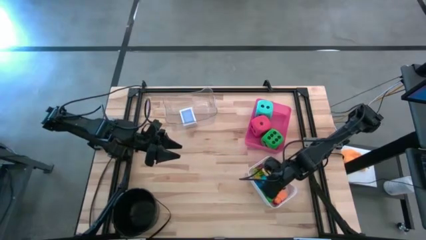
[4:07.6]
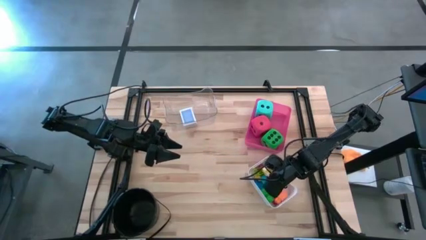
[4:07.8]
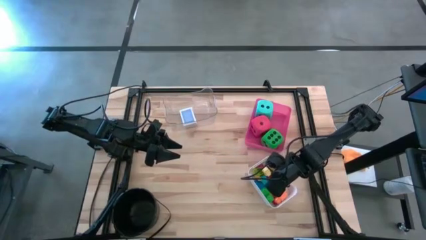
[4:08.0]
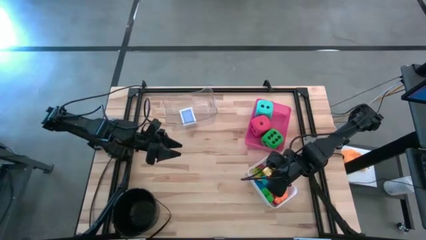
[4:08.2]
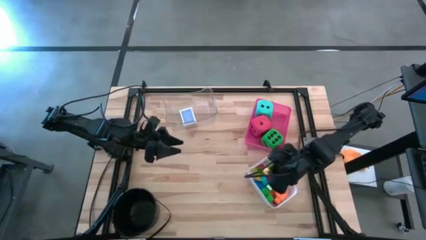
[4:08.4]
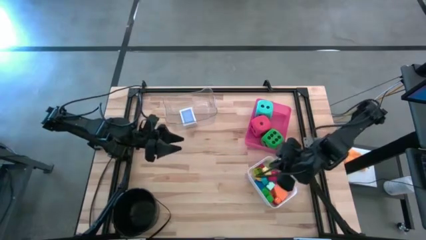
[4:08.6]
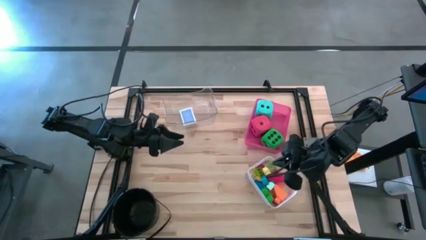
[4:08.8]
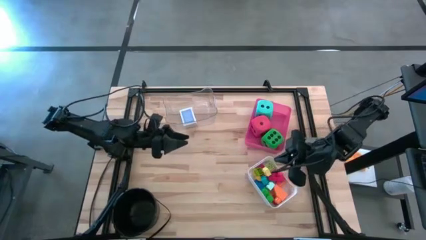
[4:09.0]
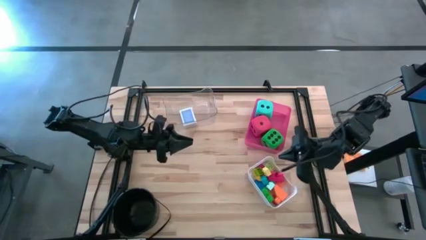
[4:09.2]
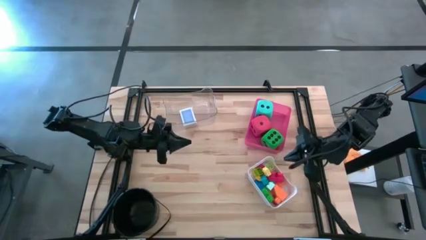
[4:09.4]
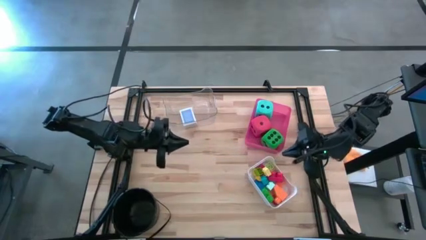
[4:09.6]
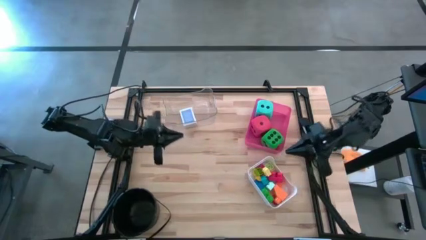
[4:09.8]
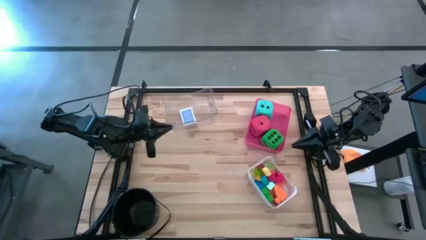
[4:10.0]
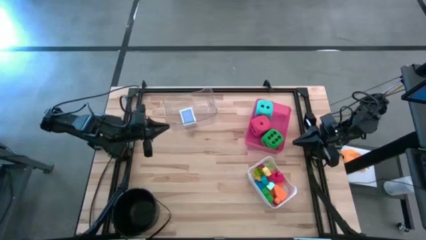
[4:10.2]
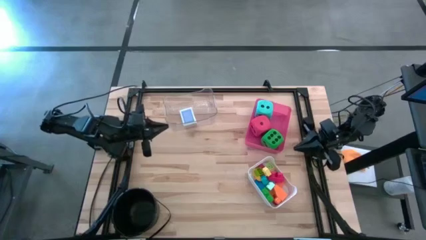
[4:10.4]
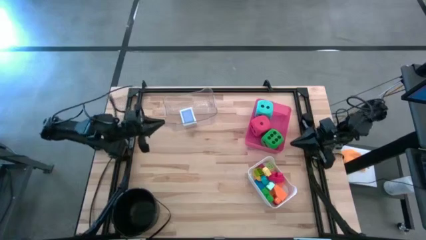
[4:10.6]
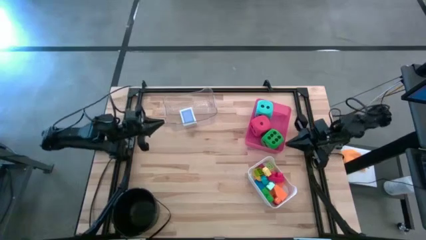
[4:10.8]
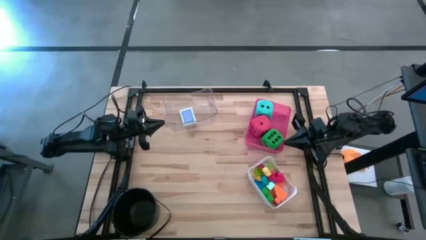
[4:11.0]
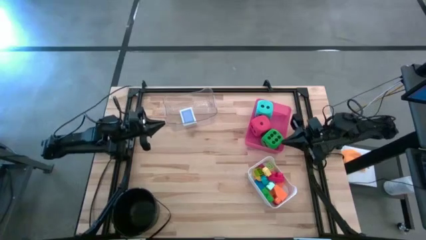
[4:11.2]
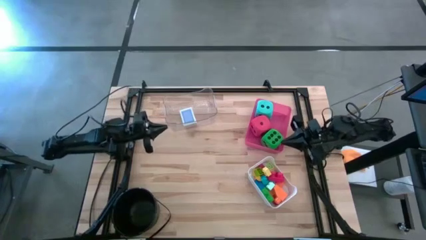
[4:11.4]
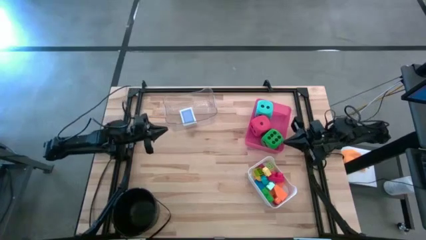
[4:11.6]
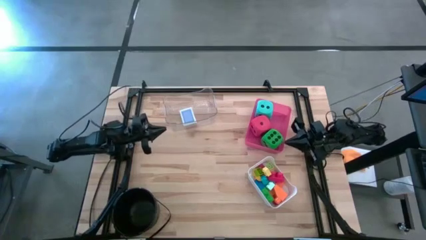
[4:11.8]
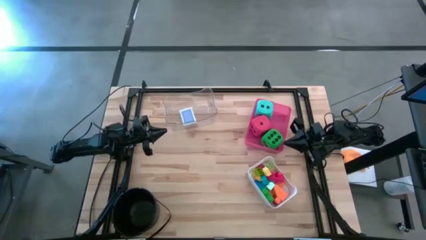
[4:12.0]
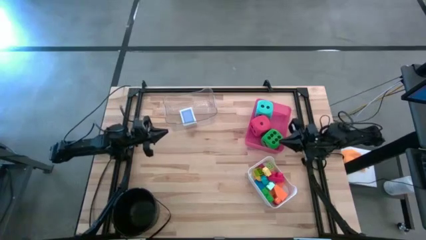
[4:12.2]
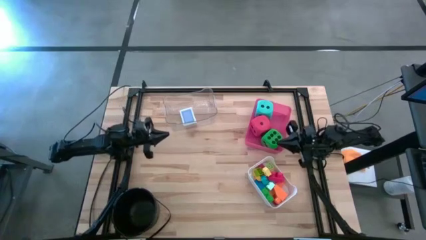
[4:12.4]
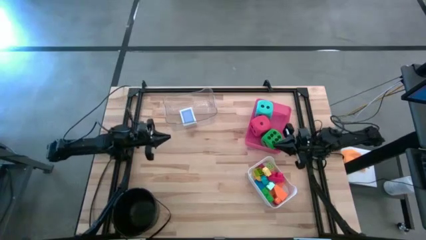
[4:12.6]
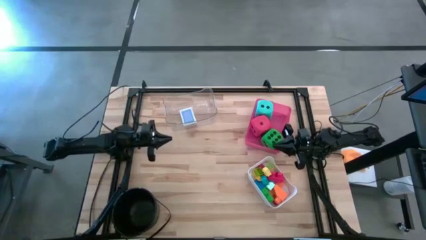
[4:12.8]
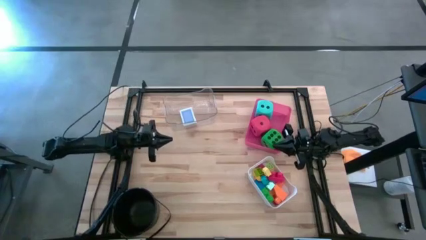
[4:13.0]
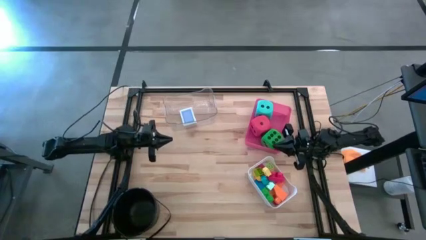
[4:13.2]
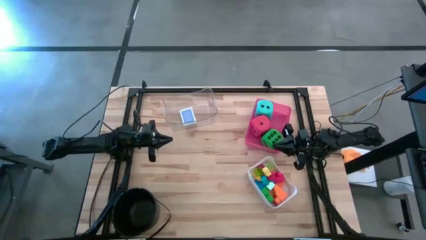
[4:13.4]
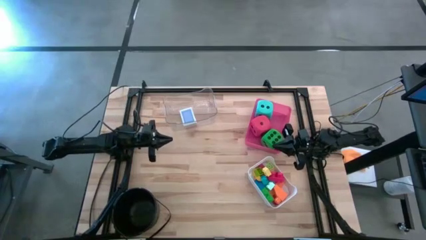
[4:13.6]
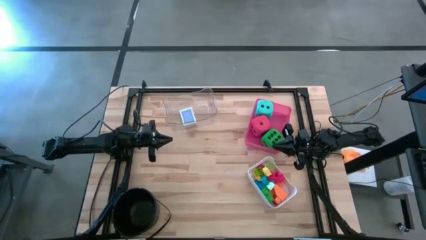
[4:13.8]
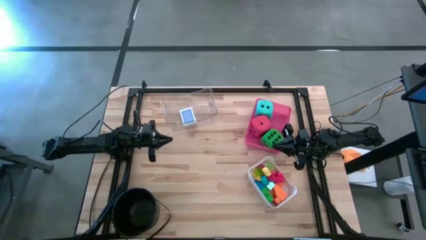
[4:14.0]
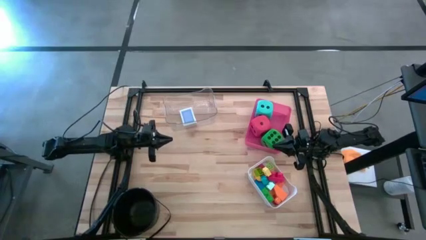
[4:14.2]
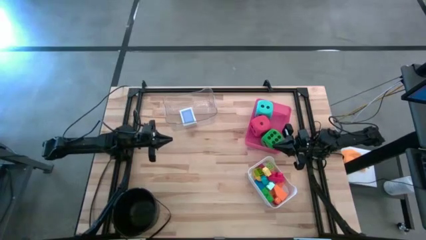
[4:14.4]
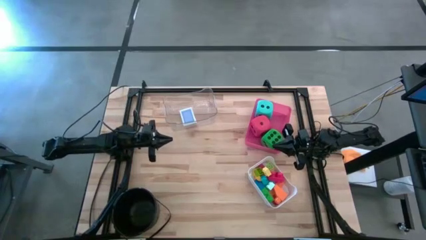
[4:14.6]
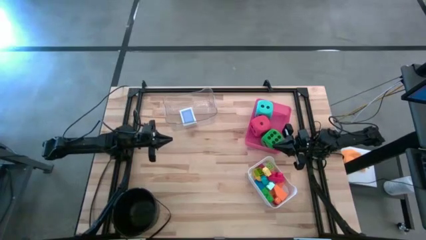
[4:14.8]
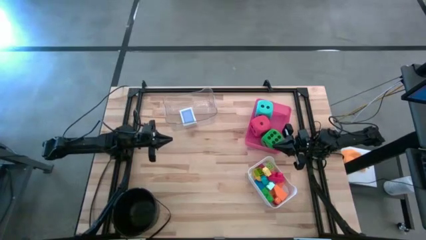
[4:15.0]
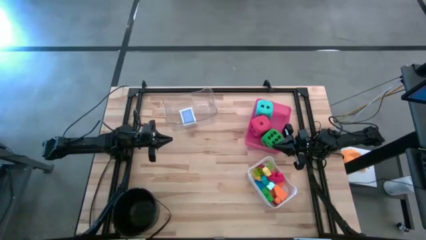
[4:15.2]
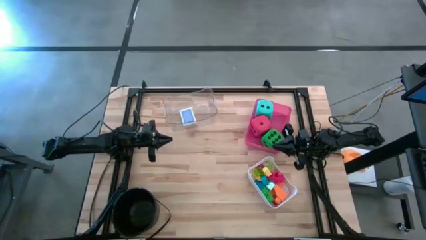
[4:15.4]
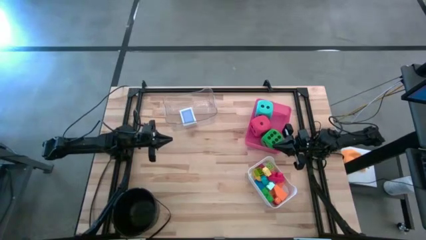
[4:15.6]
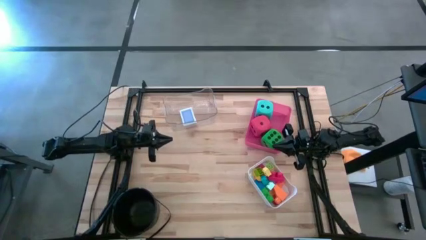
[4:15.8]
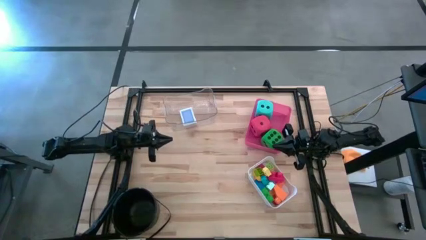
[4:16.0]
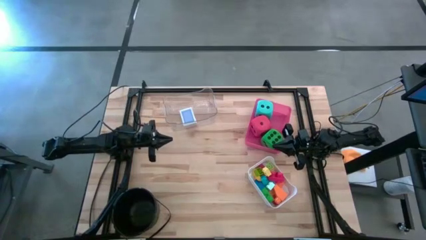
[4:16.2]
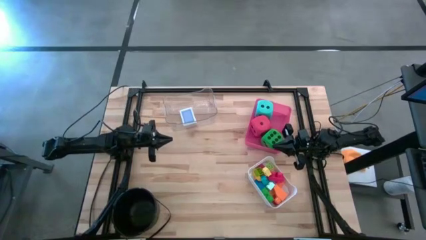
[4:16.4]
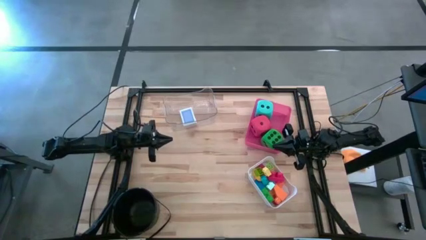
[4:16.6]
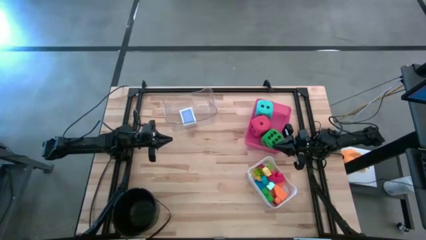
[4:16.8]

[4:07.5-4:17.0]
Task: Pick & Place Toys
Return to Home Position
